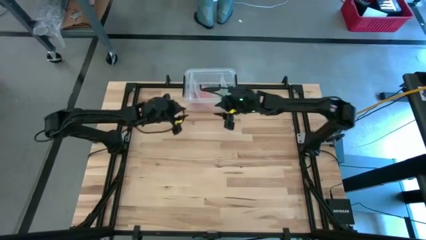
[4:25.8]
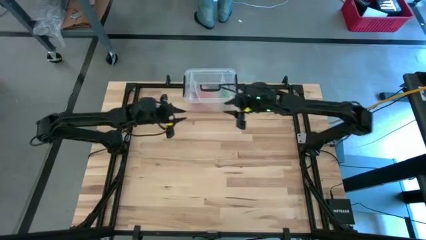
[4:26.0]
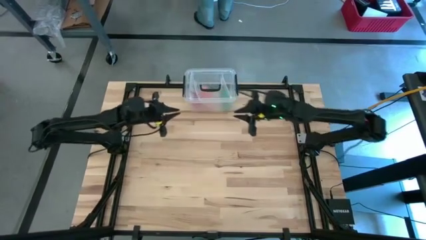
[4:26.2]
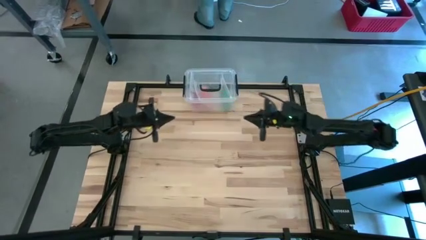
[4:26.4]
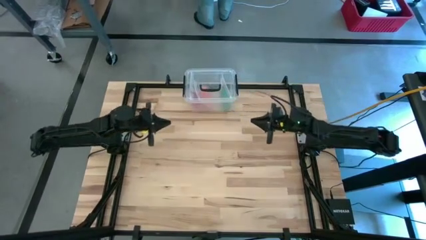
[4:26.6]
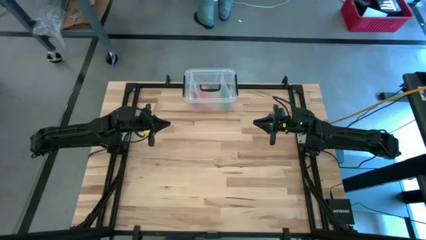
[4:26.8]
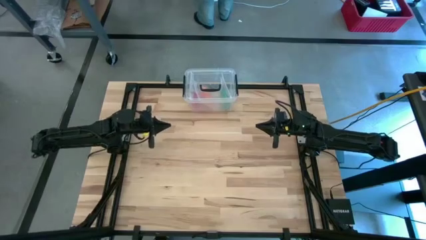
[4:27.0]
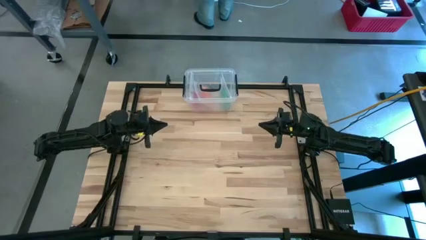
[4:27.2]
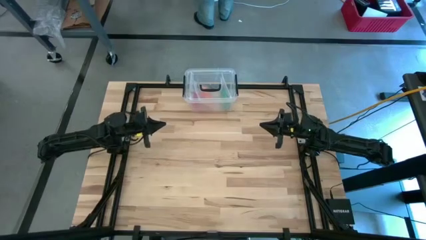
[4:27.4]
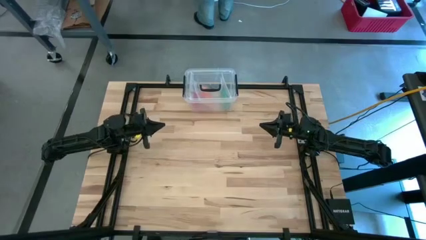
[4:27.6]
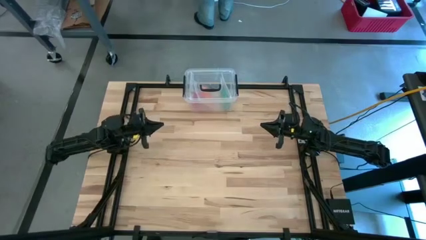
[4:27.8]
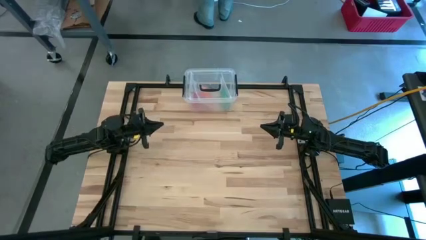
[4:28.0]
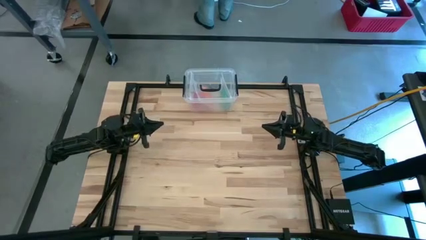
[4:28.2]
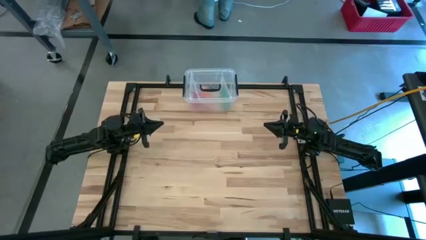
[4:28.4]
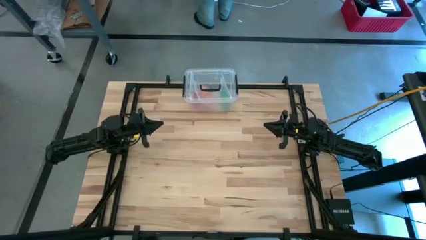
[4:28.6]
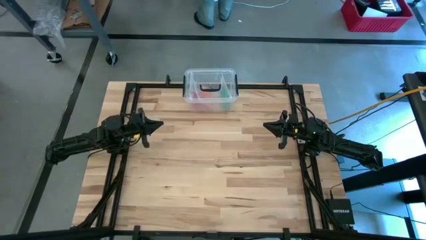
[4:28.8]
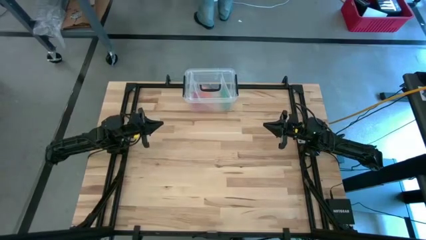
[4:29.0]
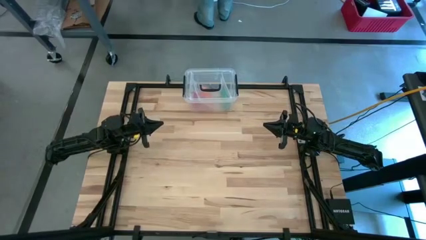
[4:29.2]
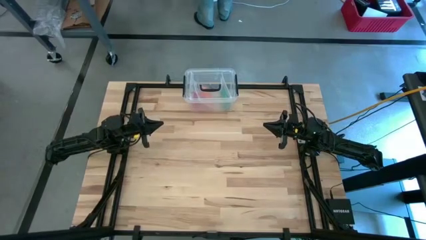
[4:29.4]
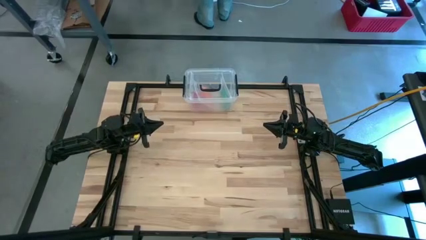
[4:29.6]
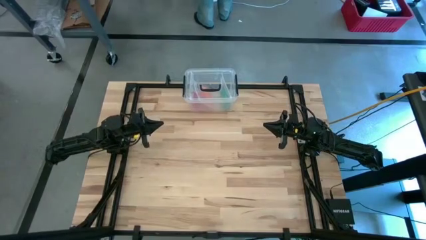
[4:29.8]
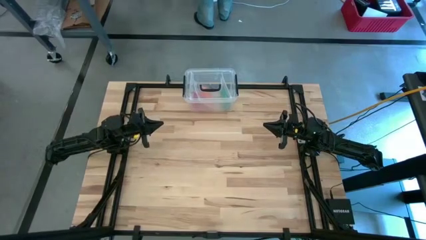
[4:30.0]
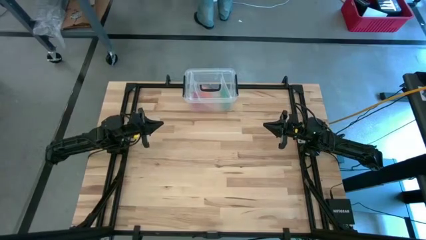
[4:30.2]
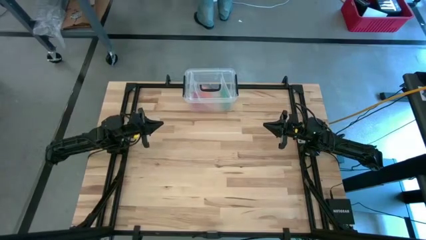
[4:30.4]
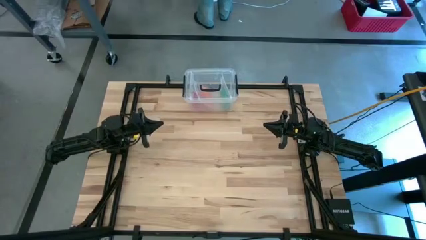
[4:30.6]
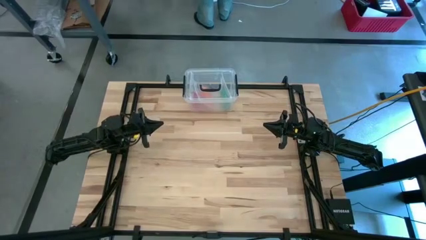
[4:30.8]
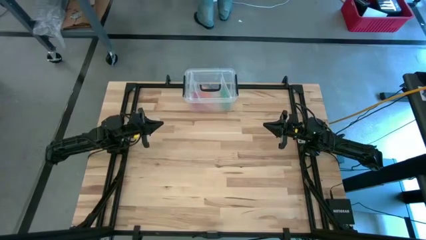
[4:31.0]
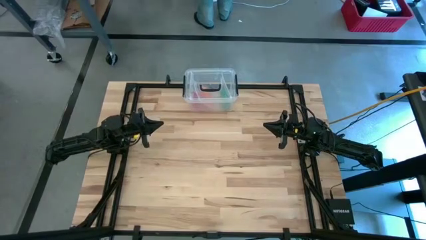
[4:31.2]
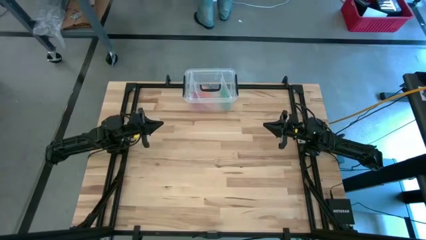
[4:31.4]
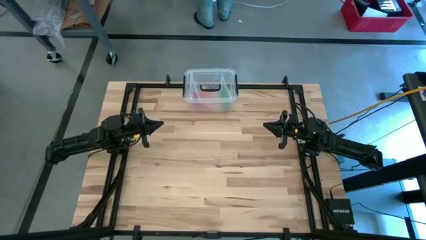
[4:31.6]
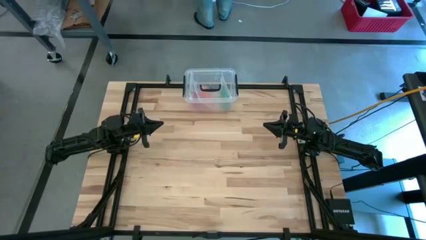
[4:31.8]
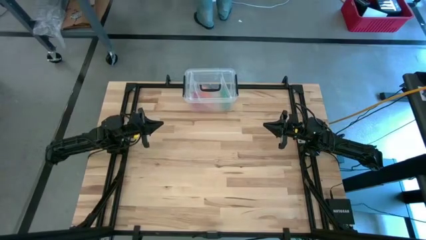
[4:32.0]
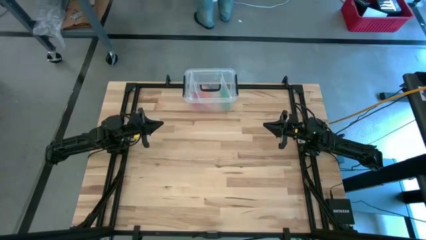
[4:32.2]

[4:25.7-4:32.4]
Task: Roll bandage
Return to Home Position

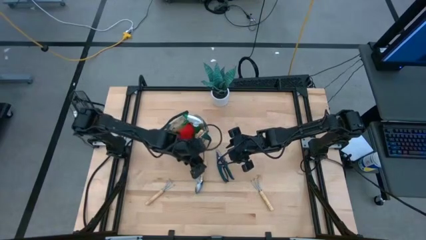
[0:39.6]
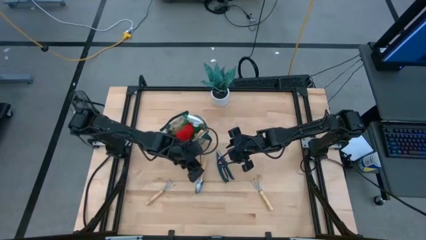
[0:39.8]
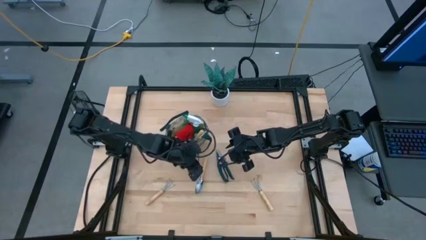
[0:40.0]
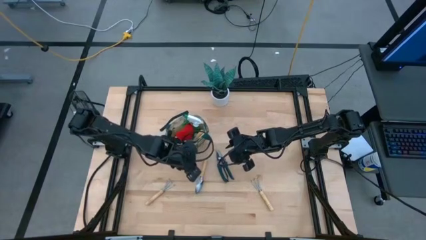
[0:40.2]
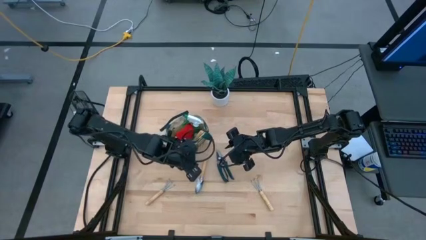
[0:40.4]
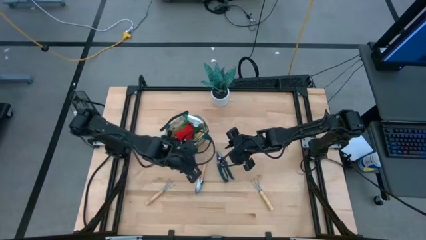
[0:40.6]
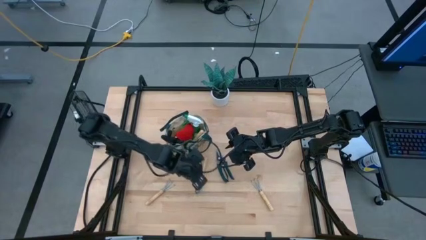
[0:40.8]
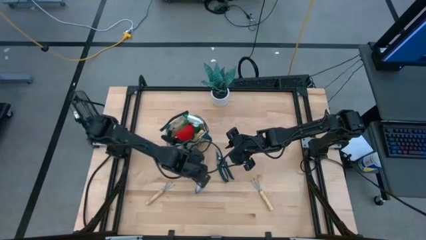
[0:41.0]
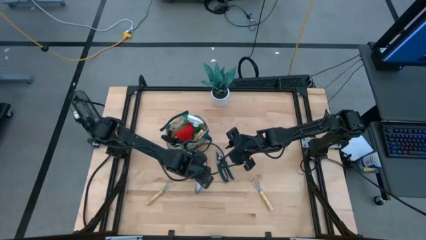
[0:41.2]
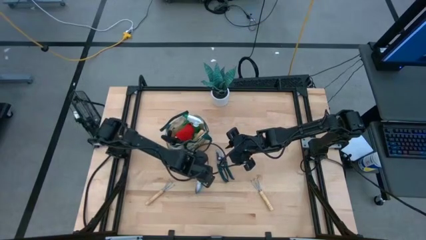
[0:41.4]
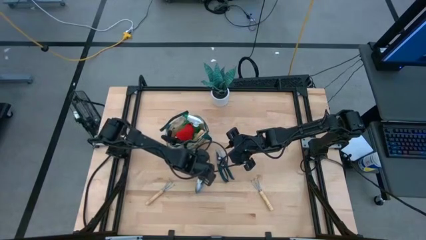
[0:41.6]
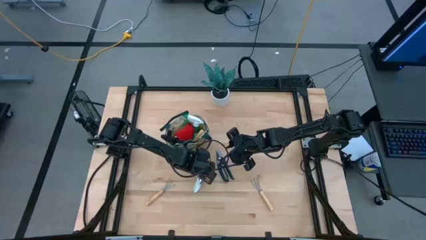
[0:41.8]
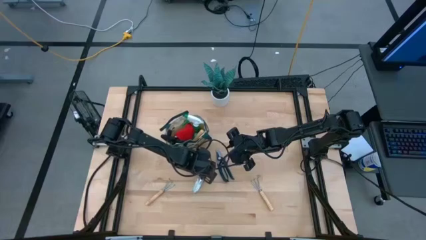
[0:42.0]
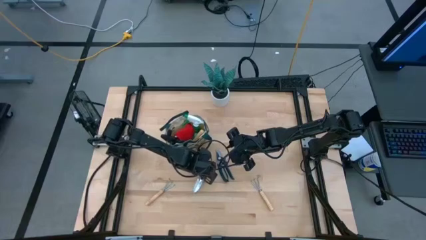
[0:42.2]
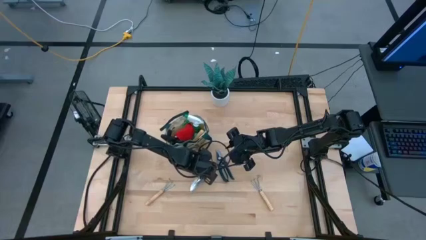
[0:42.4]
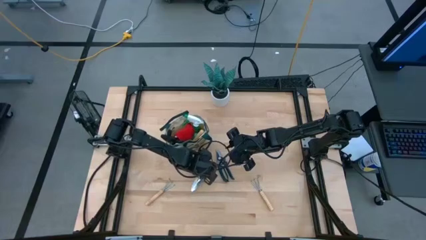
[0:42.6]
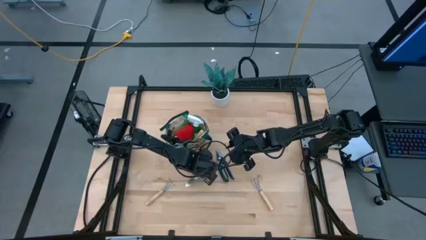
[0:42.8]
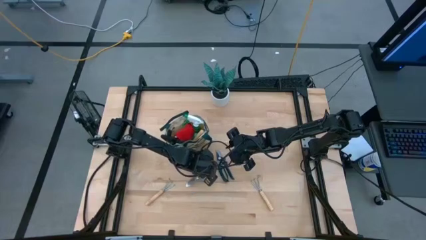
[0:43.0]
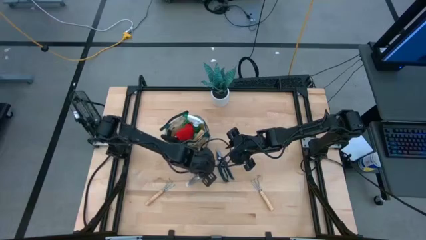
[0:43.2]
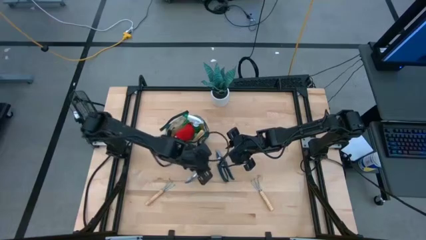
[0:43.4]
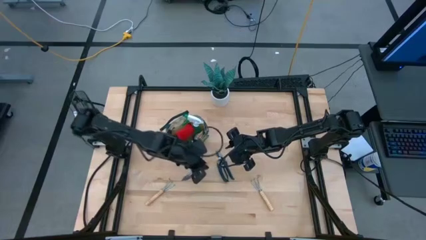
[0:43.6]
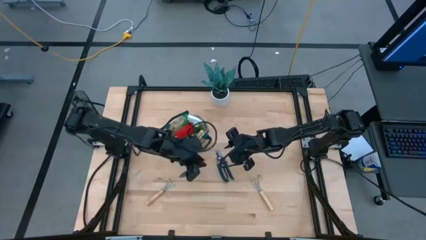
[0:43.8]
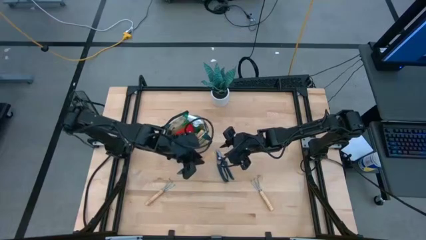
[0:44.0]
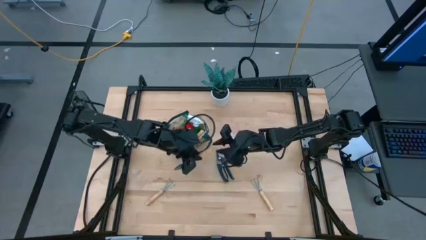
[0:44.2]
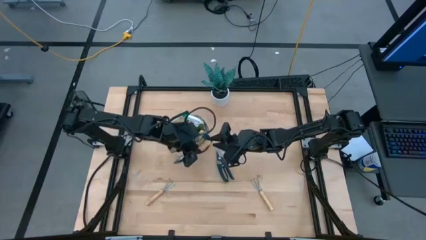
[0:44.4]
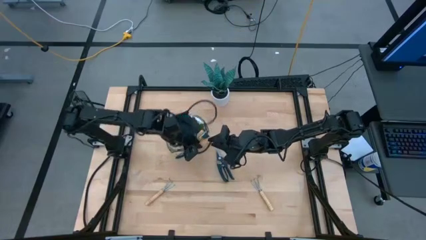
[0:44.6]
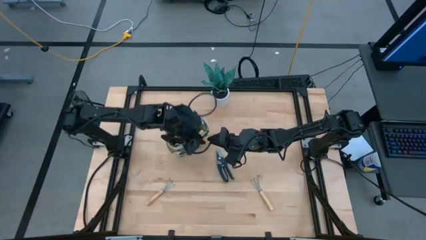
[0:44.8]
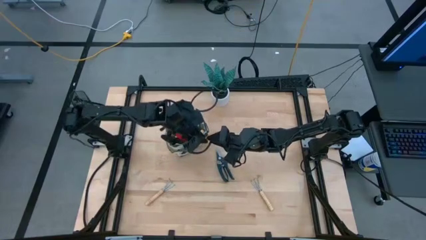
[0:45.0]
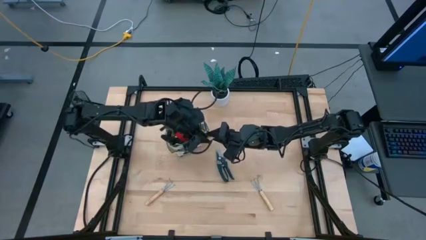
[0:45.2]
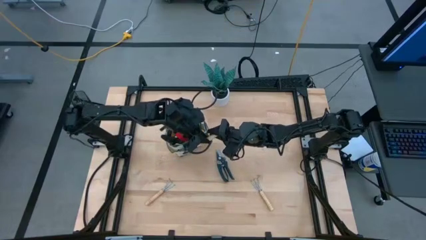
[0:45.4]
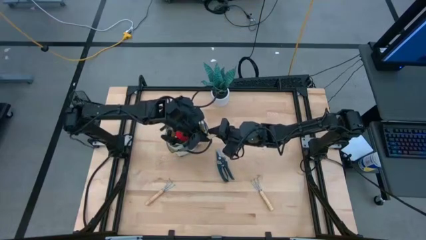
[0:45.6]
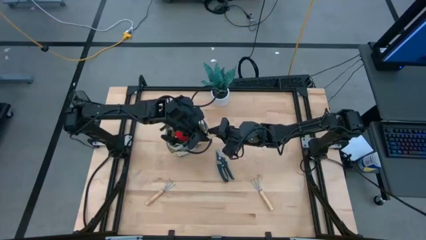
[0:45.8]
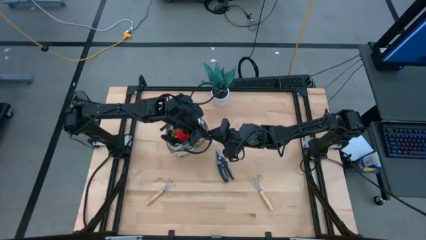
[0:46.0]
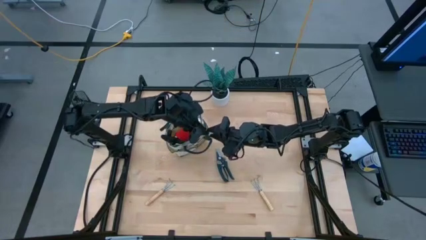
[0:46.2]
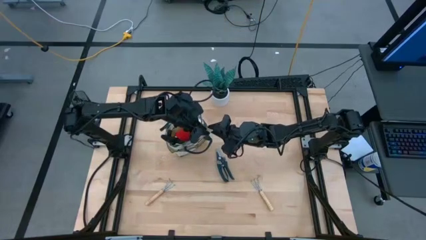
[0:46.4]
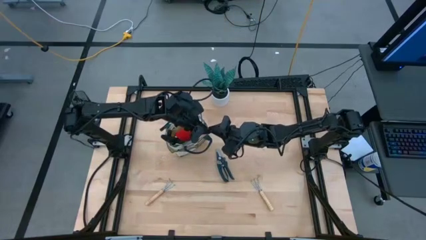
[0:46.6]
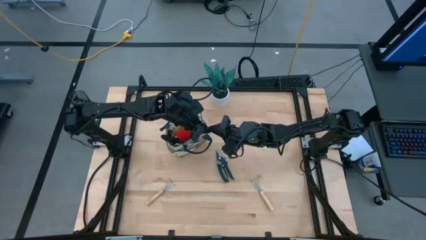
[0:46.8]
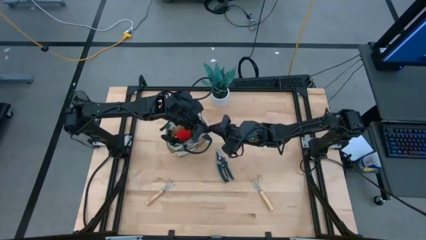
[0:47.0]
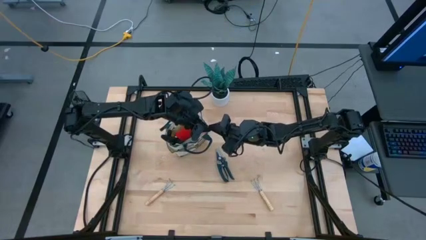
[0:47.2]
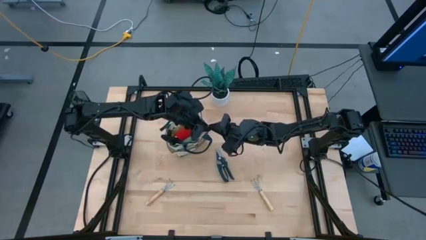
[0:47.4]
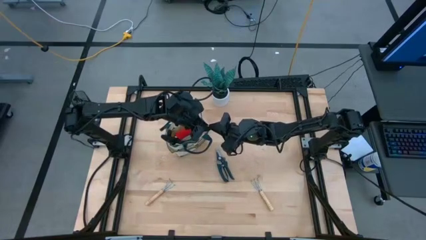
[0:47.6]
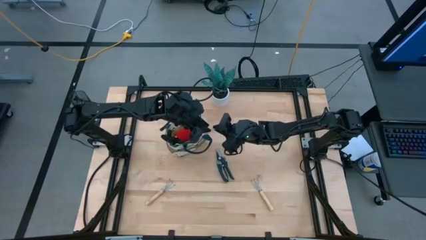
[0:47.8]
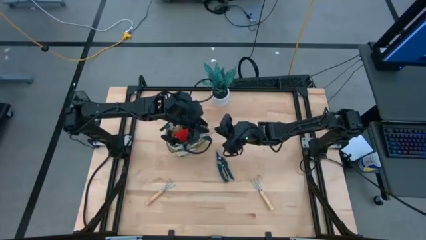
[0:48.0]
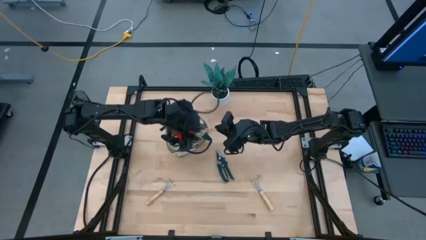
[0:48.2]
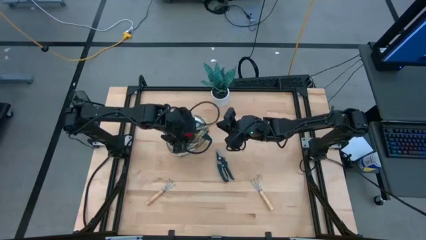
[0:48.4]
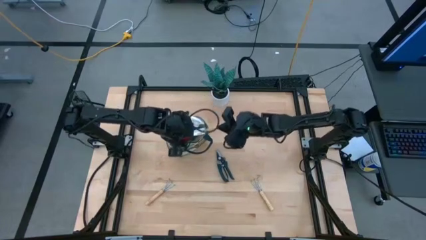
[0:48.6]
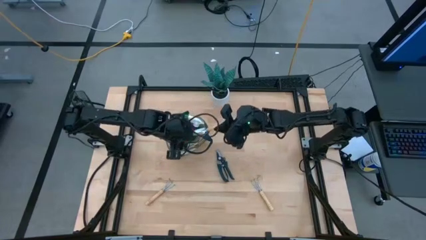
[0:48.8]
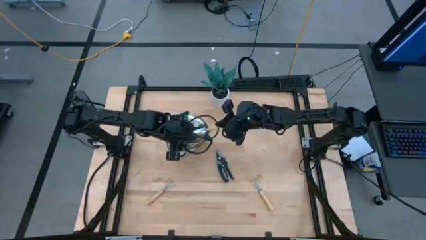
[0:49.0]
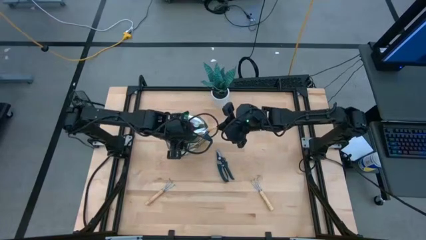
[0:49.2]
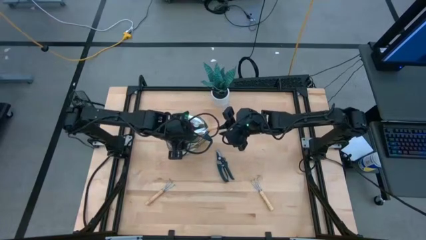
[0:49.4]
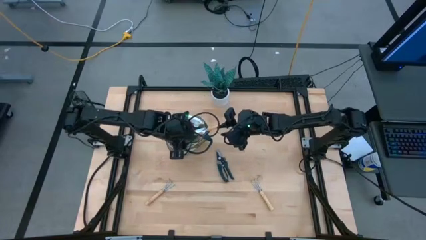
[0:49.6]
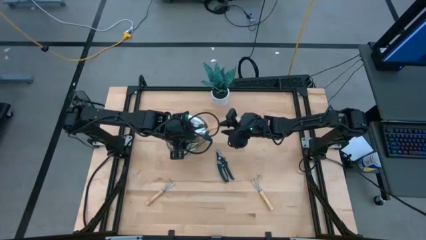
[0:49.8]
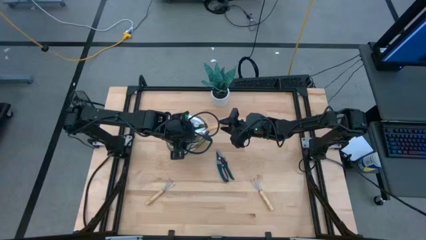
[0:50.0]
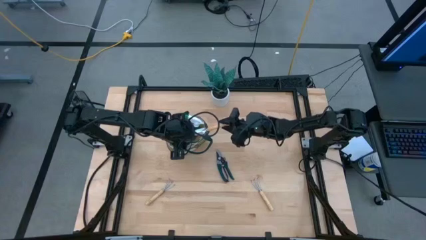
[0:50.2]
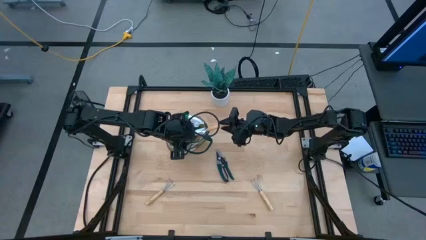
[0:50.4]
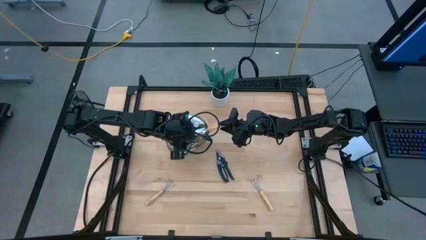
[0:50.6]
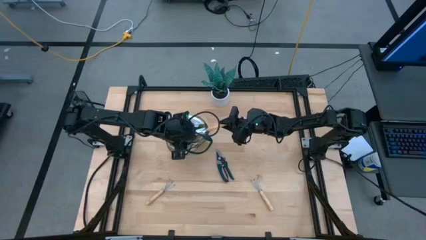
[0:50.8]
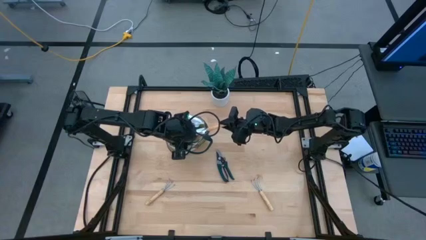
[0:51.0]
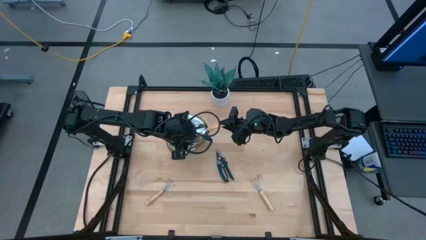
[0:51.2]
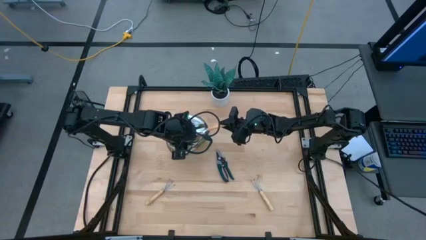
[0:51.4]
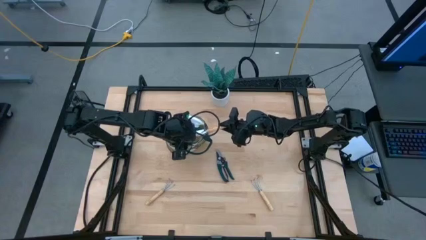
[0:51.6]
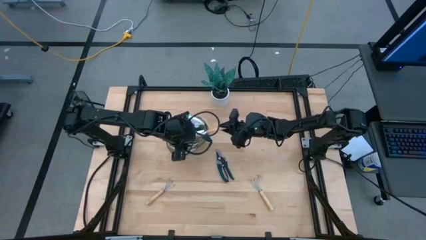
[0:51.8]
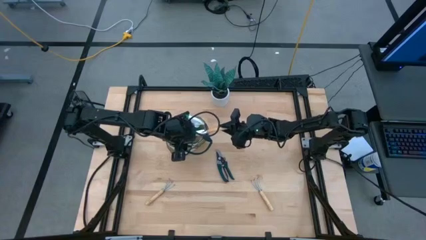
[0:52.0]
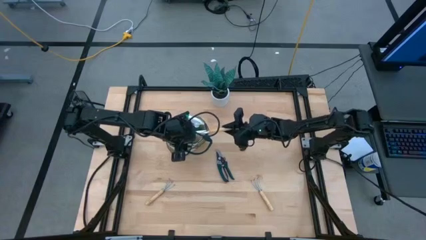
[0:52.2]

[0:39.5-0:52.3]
Task: Pick & Place Garden tools in Gardening bag
Put the brown trowel into the brown gardening bag
